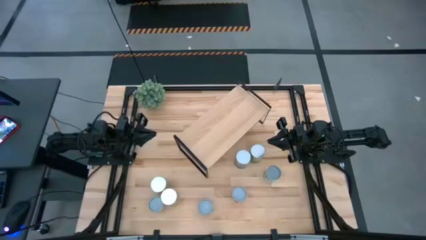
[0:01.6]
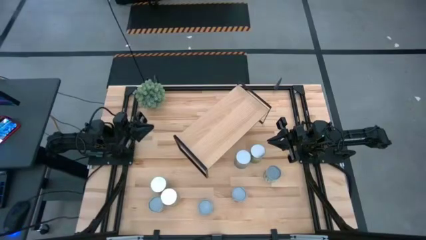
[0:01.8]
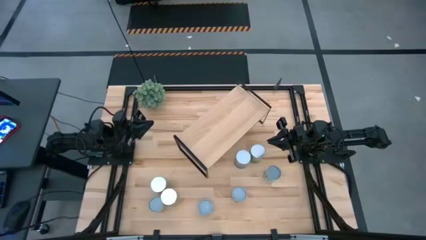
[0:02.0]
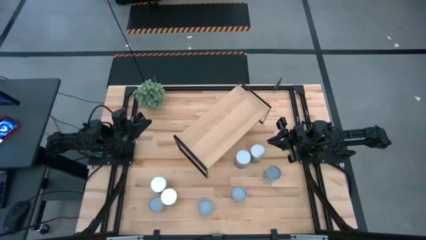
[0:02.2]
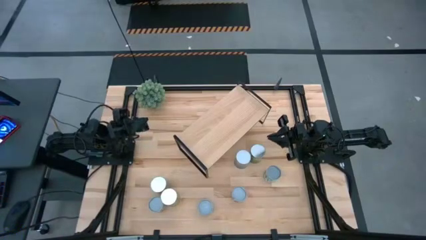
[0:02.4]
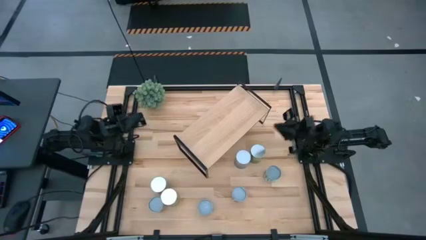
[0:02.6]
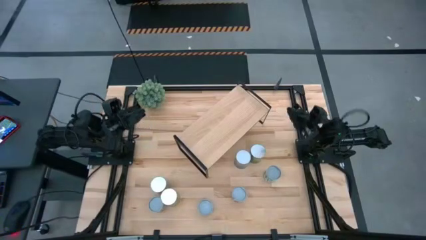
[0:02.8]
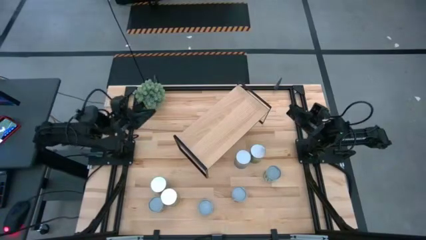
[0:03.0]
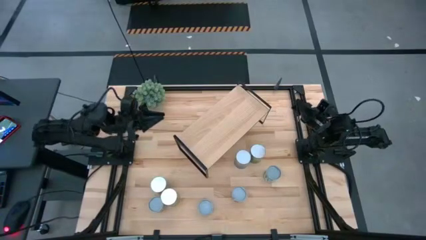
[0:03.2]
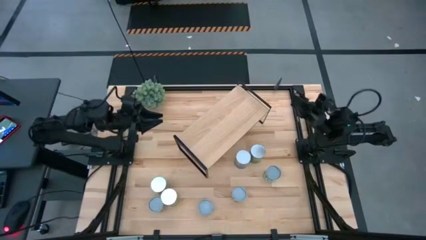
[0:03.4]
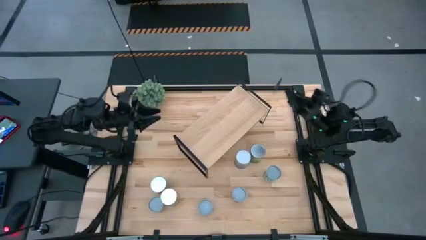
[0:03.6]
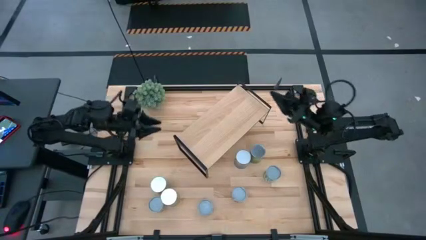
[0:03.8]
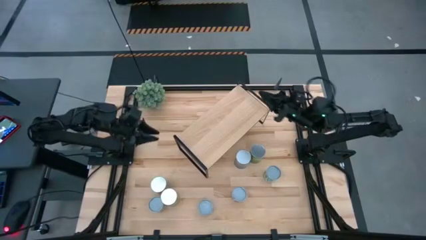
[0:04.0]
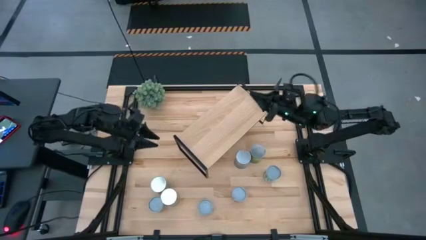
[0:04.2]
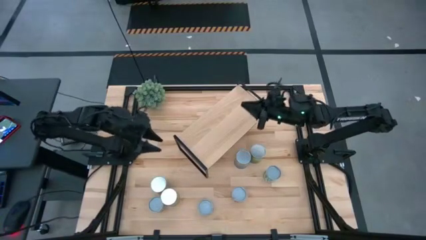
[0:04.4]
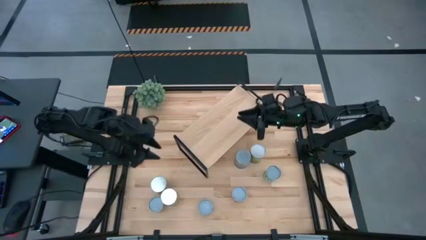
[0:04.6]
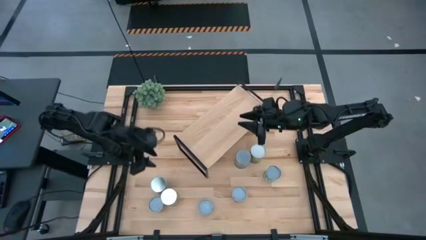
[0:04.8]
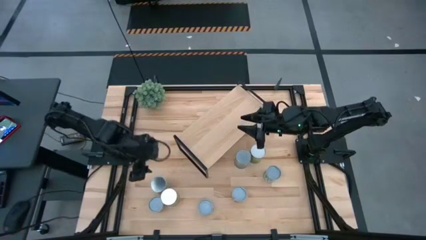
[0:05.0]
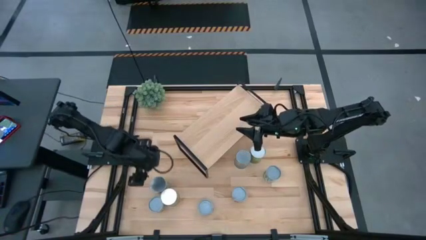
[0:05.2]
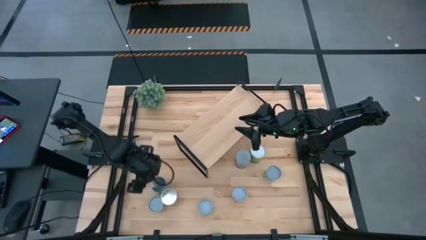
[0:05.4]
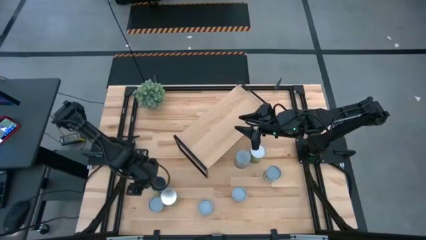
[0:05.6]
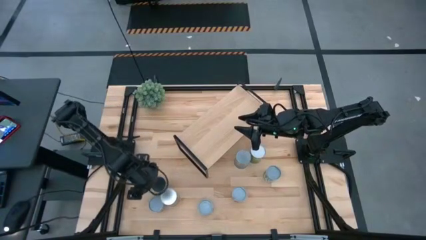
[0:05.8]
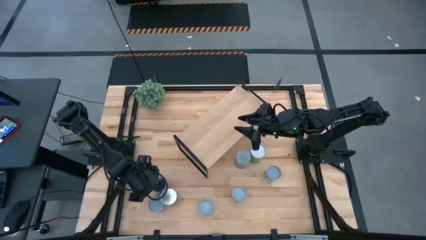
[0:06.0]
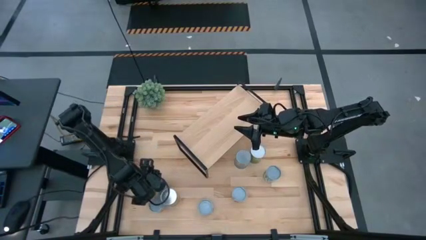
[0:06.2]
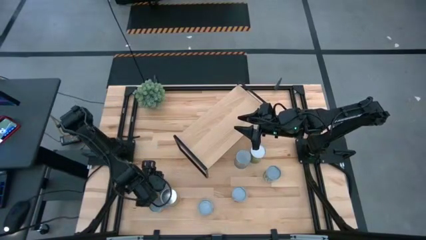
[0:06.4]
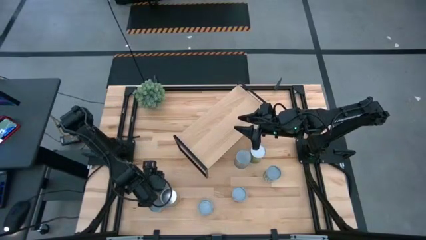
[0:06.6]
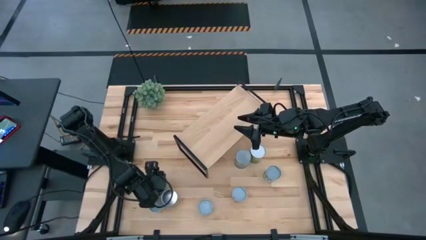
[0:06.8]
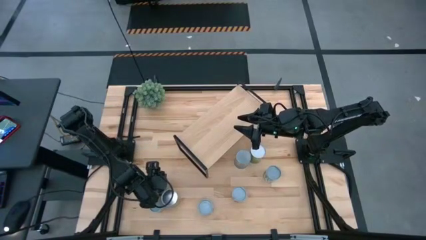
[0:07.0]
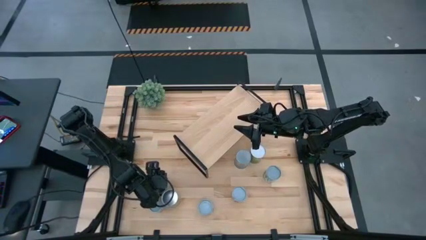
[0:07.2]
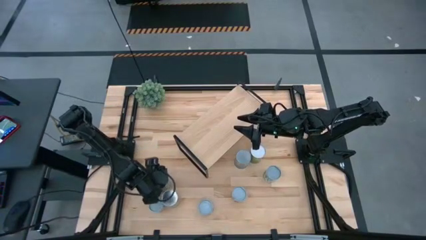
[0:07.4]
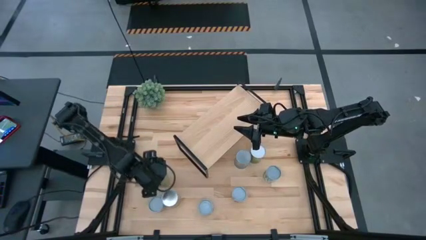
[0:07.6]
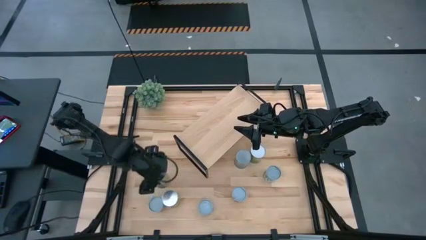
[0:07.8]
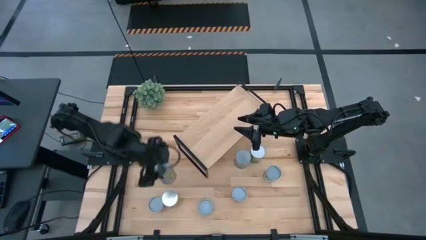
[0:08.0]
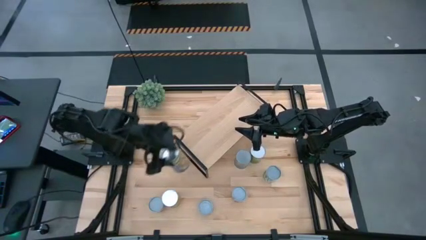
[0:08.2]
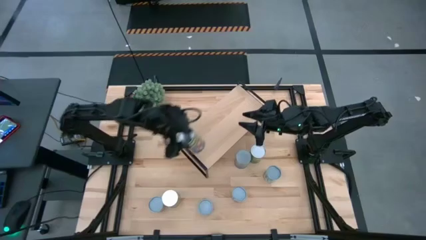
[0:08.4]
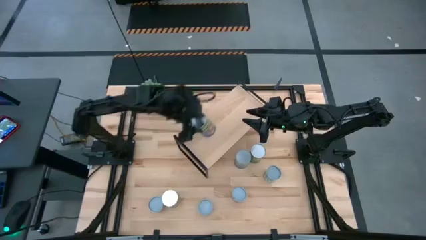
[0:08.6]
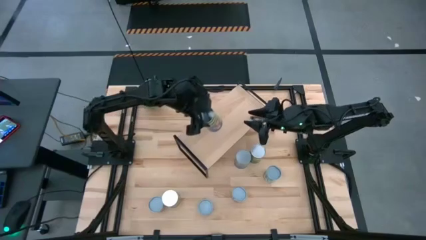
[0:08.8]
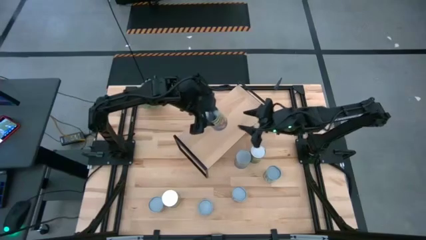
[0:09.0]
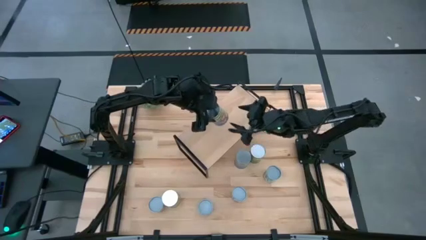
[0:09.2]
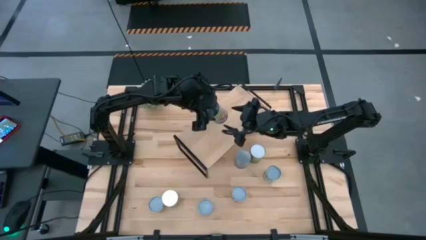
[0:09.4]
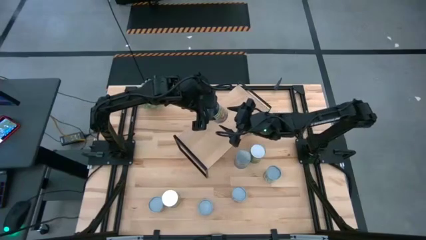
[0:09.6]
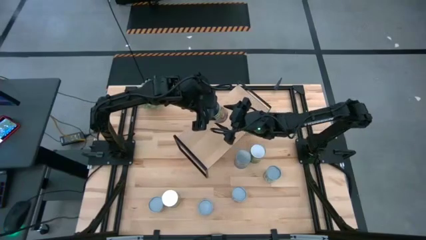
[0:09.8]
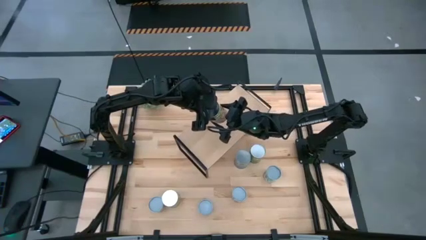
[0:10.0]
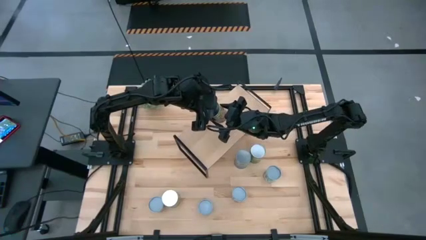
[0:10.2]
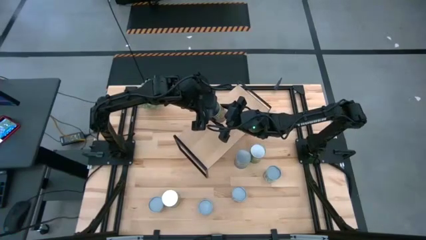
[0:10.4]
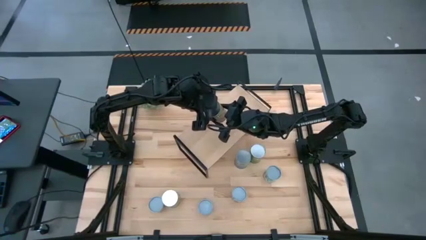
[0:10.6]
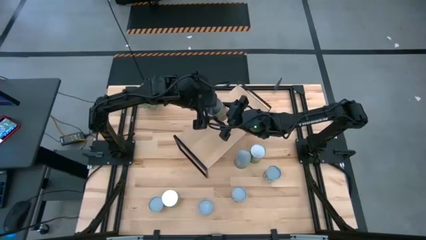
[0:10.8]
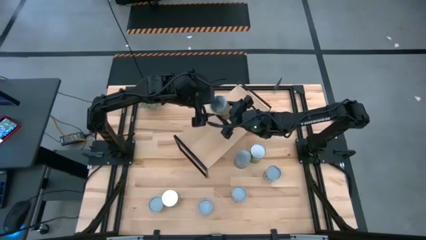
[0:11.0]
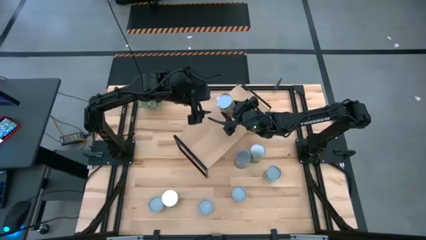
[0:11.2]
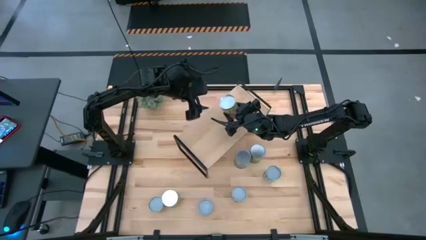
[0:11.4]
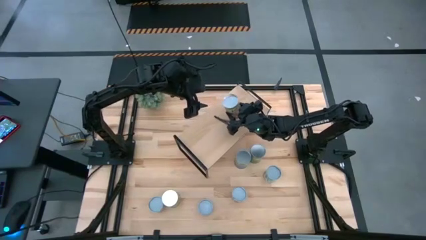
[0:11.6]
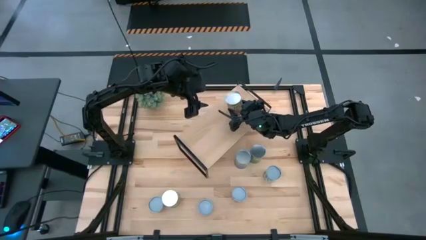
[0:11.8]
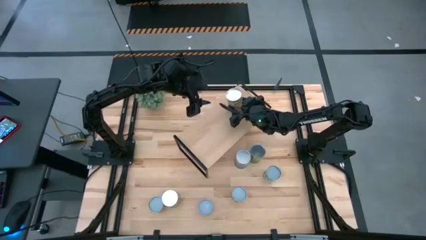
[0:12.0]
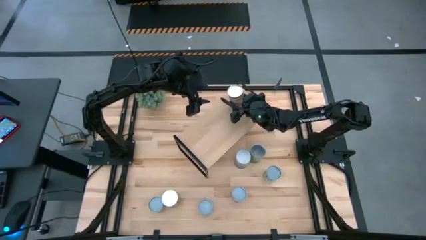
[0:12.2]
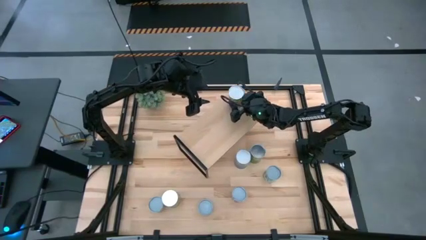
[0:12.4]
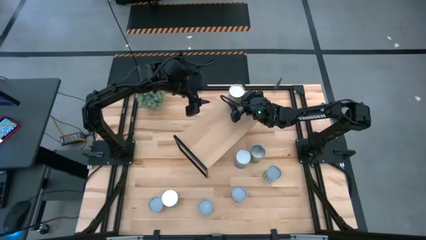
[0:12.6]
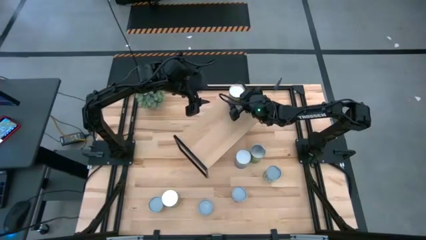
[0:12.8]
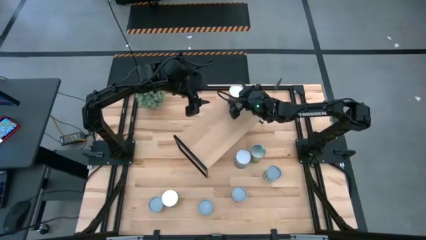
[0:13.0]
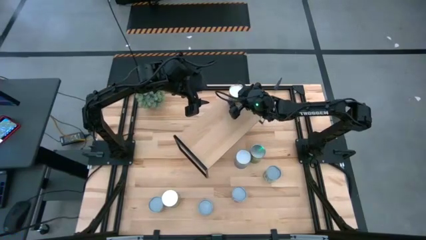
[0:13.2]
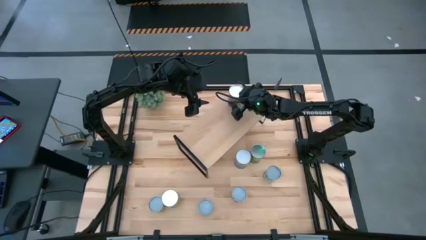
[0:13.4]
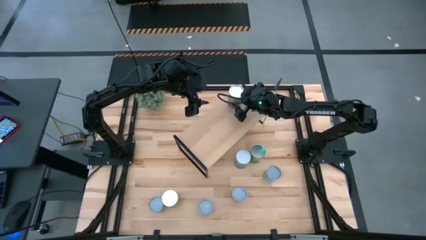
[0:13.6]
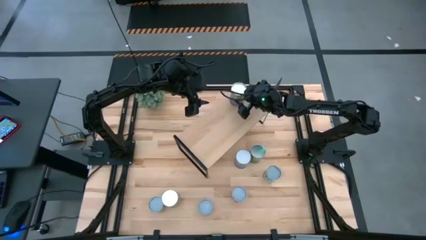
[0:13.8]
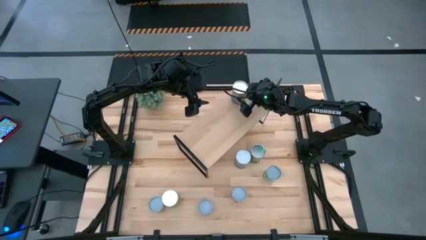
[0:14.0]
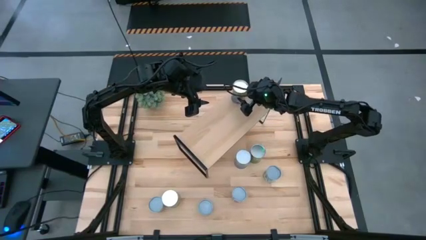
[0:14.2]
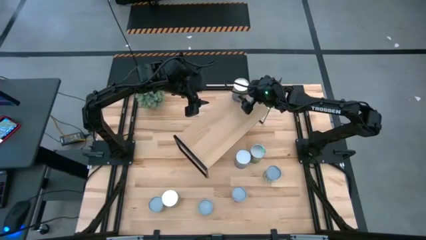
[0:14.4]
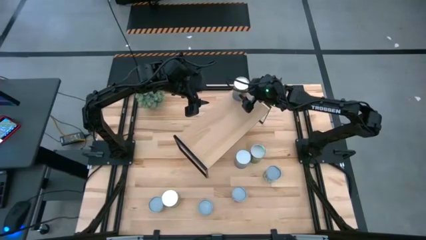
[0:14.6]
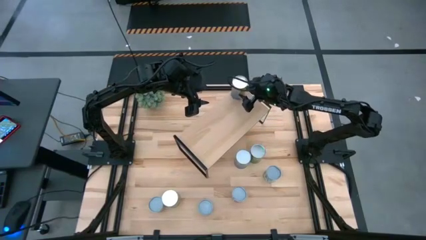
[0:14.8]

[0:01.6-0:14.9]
Task: Pick and place cans onto a shelf
Put the canned peaches on the shelf
